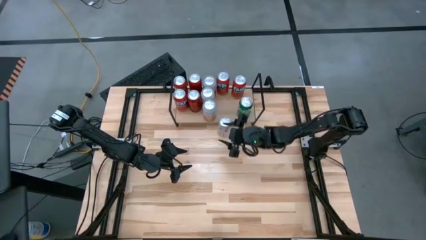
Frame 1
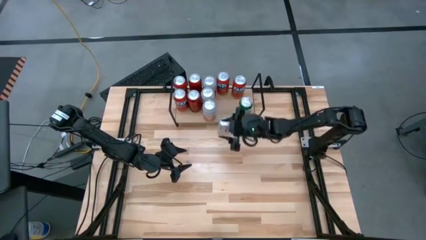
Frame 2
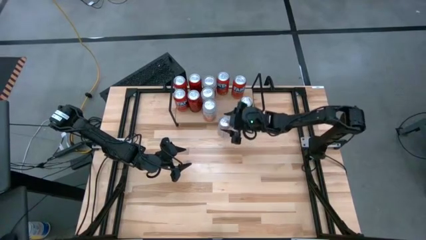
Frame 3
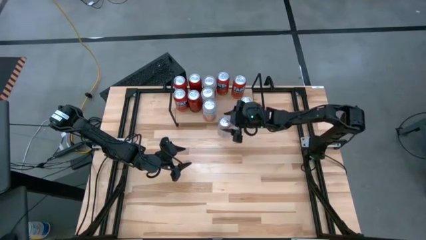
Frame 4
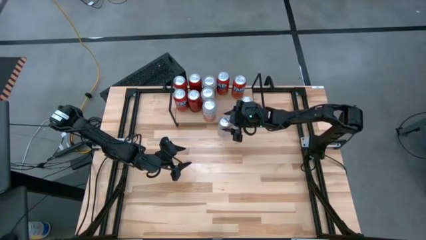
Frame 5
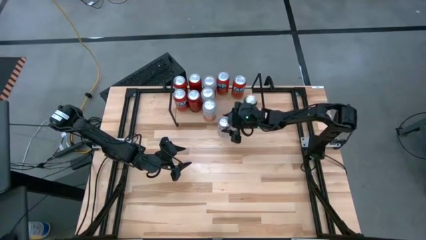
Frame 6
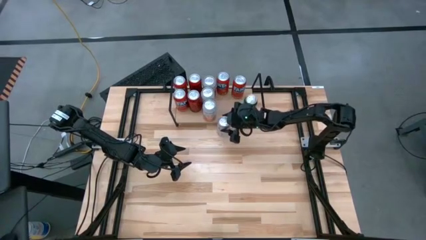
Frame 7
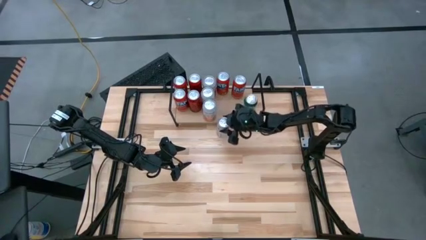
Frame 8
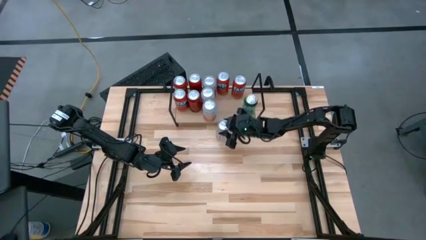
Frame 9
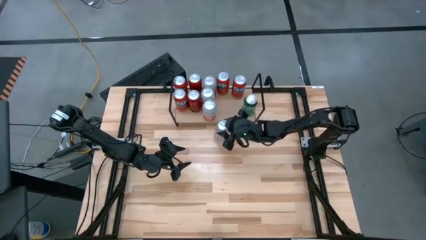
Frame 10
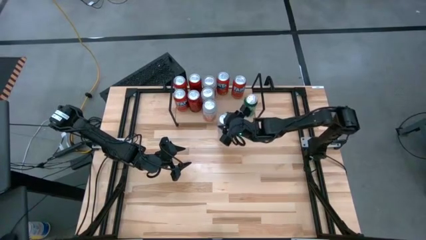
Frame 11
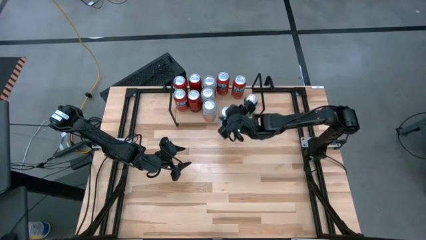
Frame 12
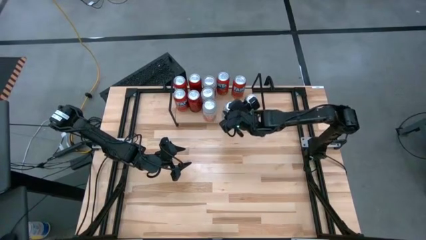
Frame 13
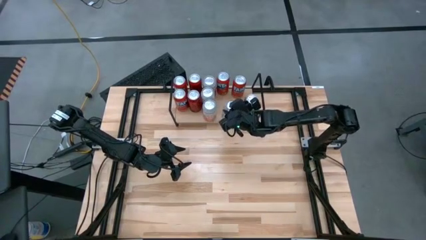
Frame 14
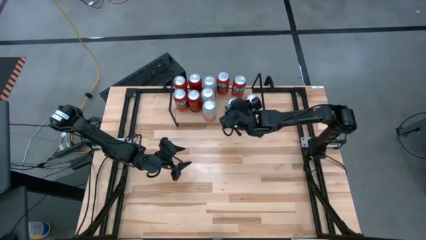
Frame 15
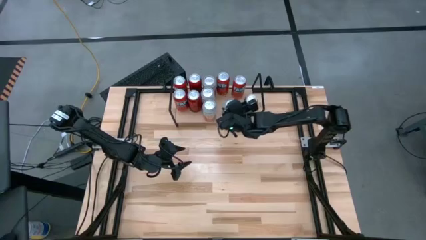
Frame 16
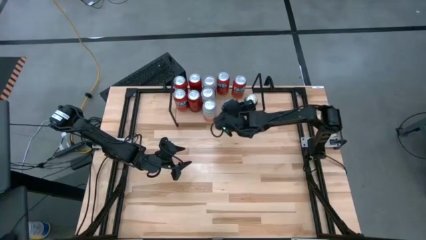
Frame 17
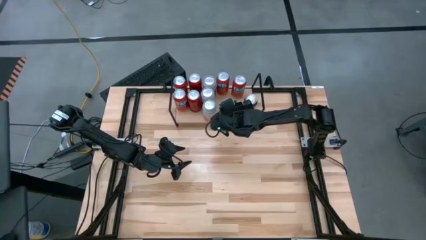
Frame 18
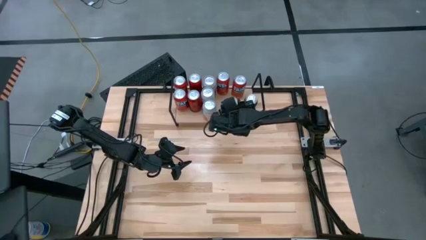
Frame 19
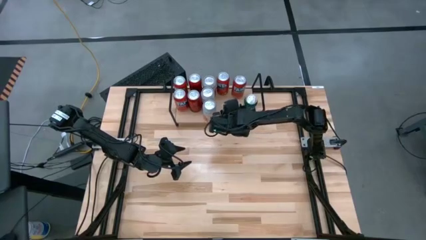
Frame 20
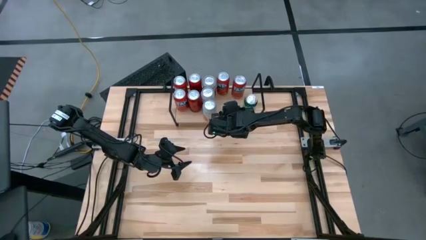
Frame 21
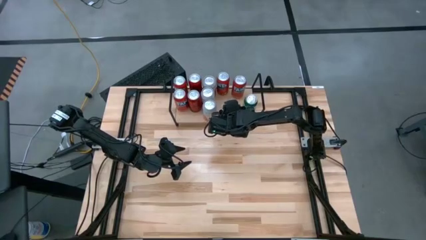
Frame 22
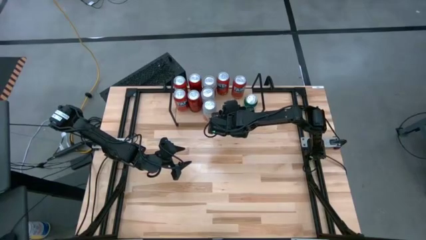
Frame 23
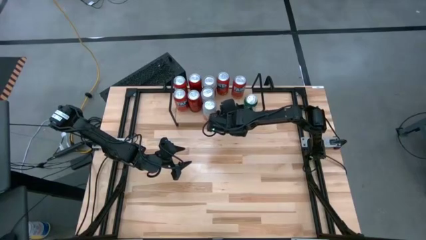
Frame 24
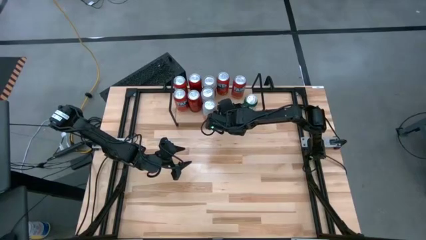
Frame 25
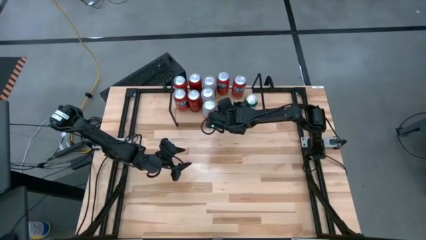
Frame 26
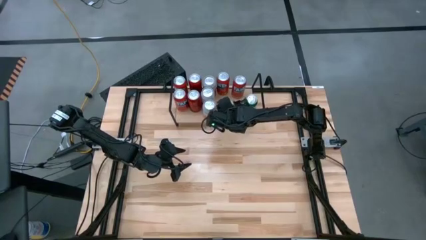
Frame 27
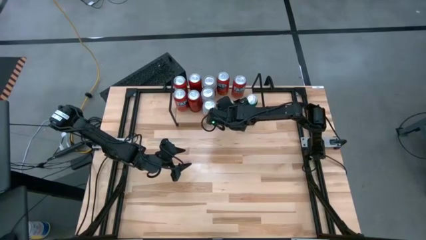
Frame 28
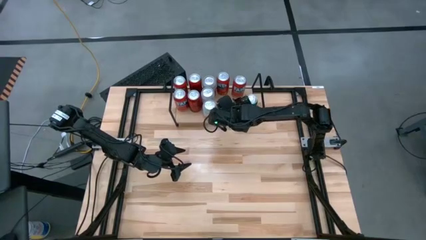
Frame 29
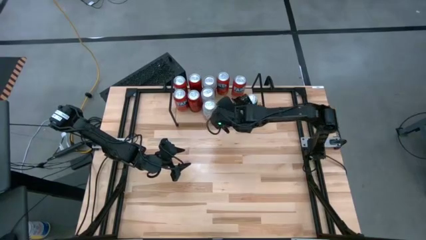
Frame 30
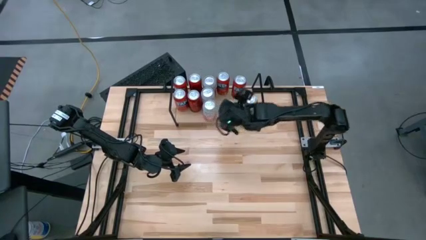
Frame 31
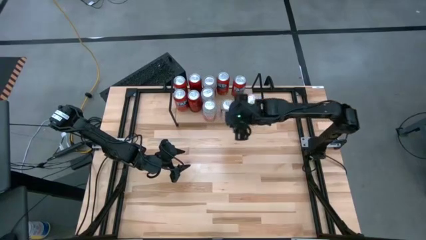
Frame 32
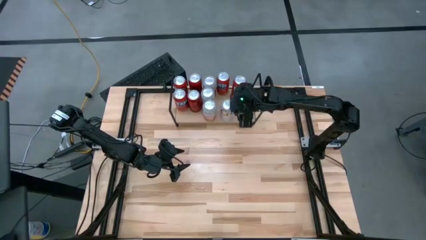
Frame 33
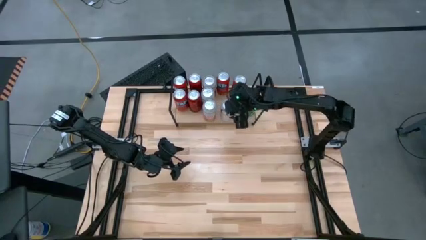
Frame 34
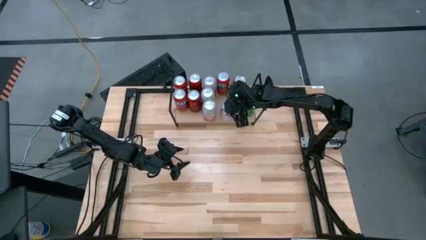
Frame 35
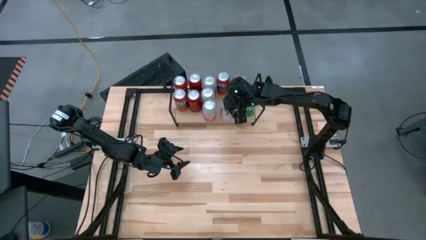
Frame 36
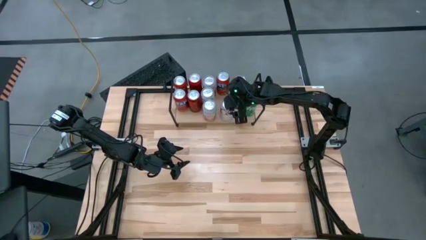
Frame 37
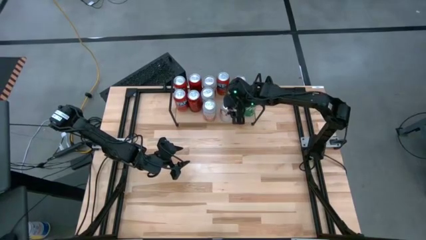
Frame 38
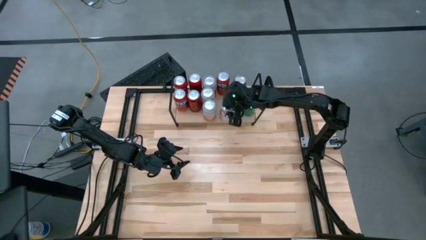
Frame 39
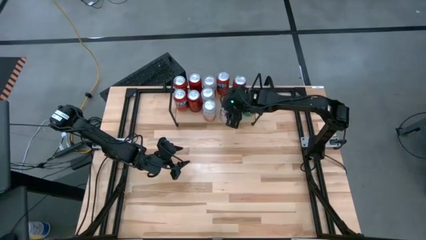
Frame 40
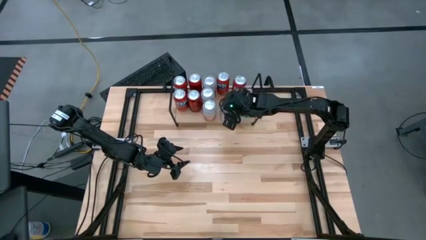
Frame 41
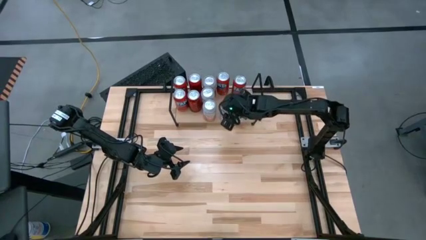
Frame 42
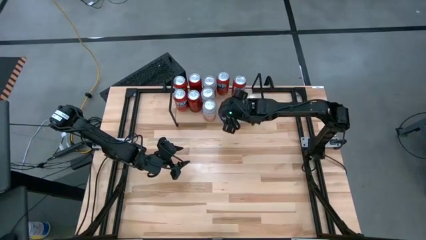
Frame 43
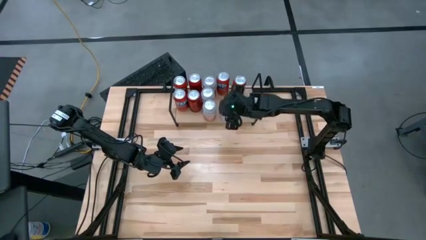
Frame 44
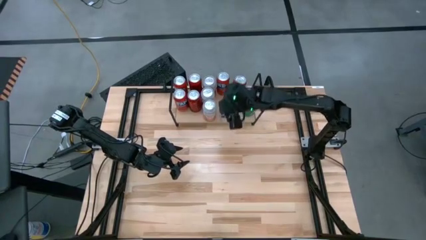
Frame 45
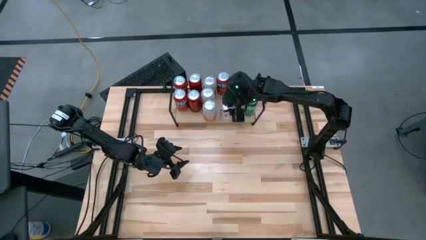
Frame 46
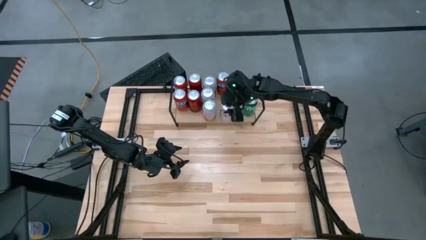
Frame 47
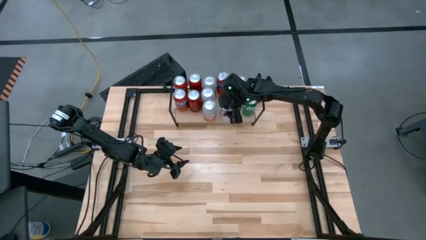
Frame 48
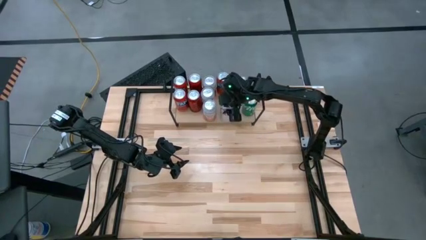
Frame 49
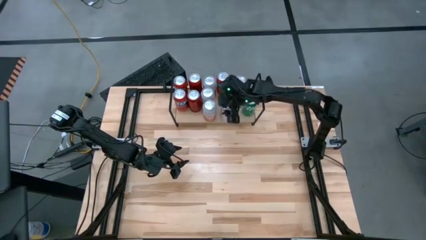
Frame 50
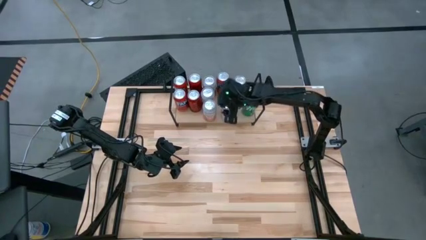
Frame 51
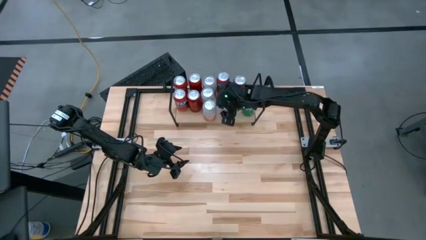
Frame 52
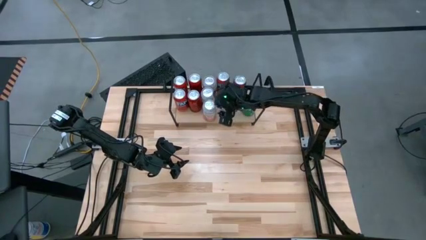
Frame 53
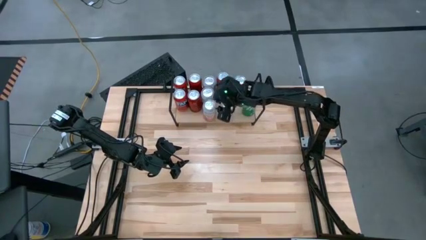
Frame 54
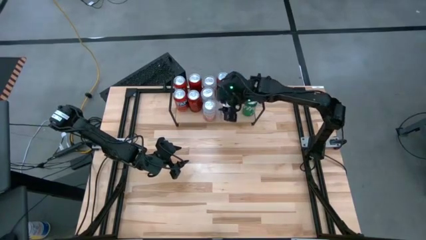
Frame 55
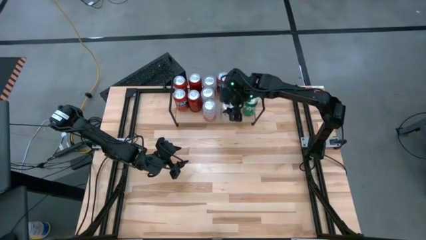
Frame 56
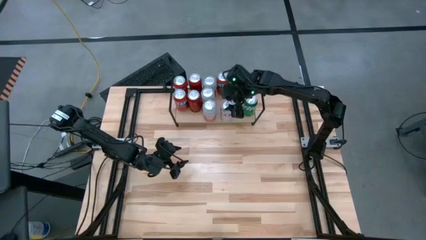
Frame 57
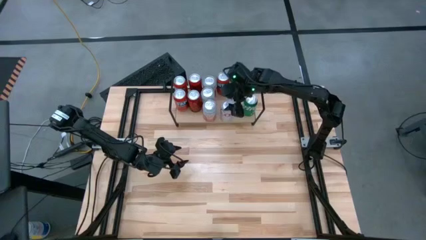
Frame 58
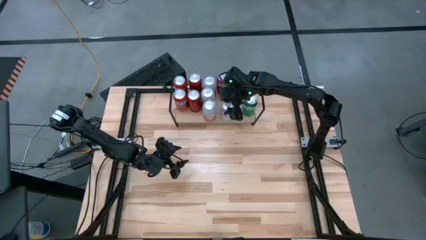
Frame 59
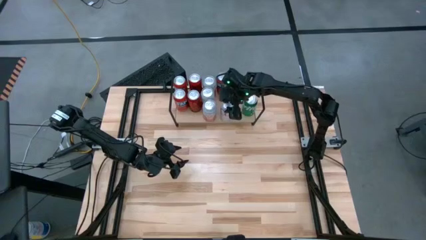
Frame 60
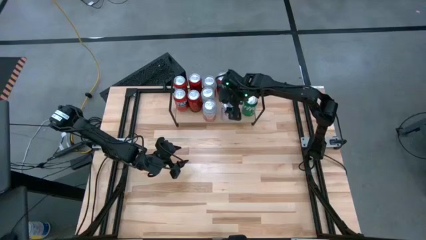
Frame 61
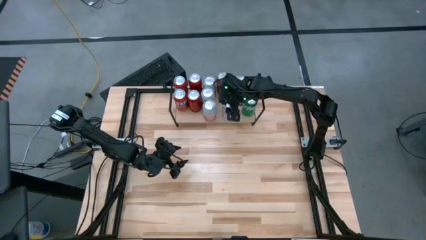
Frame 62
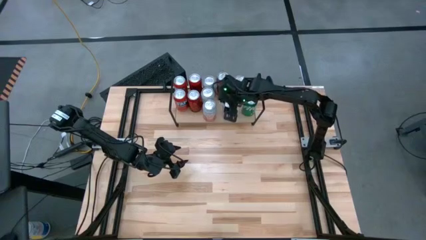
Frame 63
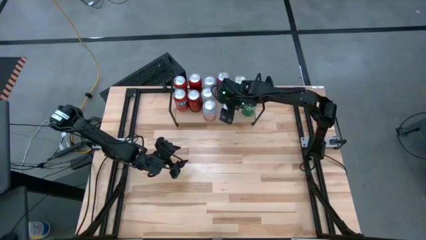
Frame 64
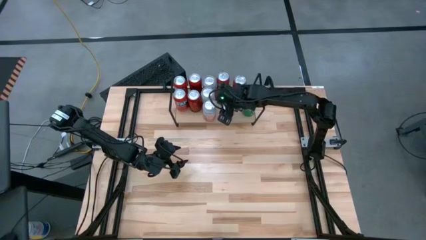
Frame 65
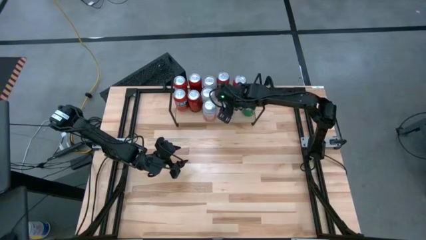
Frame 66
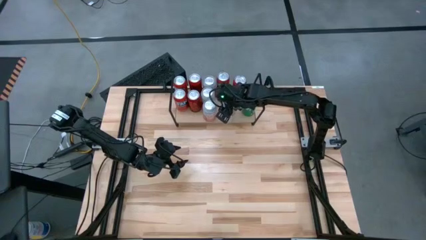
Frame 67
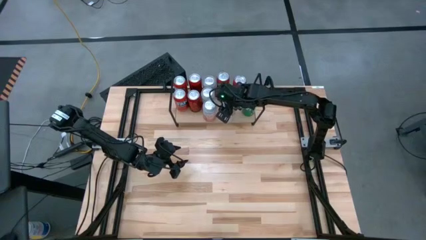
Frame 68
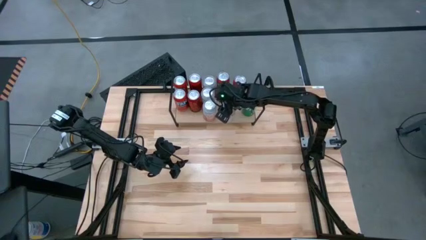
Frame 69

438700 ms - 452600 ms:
Task: Place canned beverage on shelf
Put the red silver soda can on the shelf

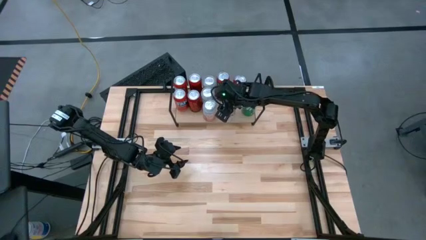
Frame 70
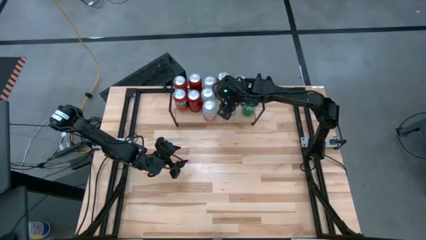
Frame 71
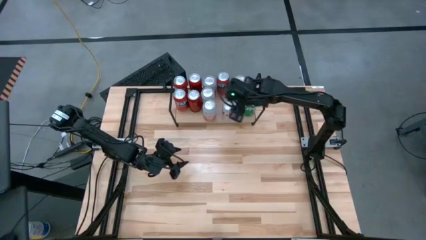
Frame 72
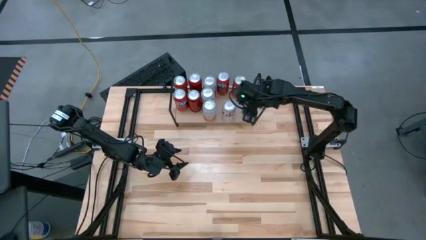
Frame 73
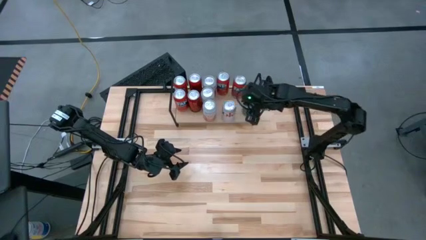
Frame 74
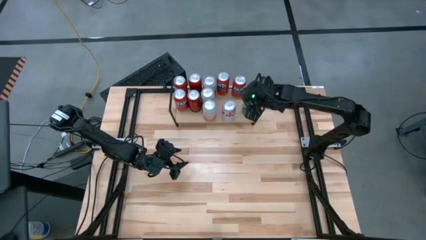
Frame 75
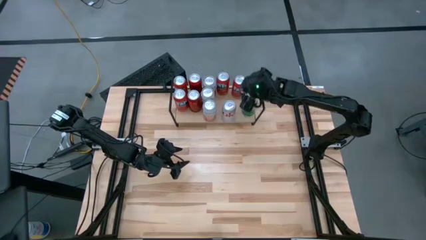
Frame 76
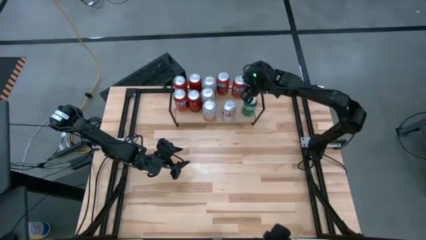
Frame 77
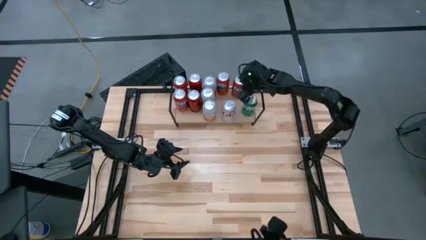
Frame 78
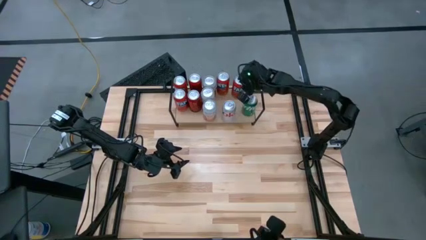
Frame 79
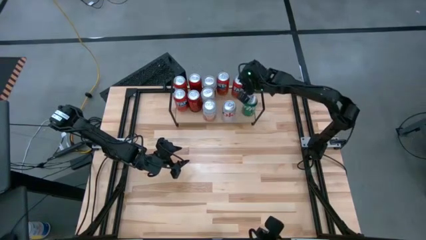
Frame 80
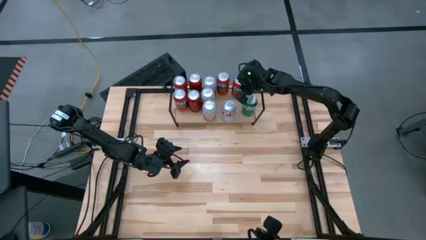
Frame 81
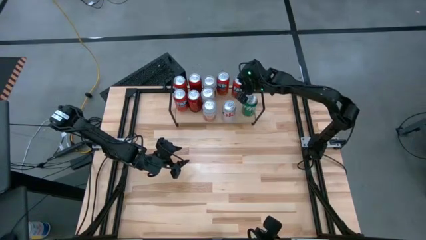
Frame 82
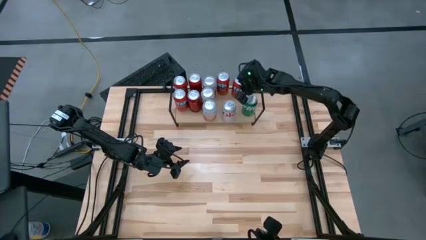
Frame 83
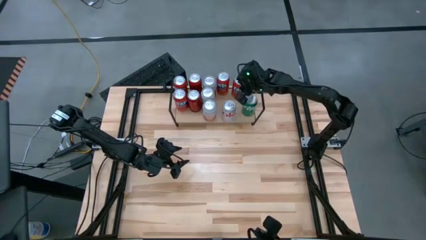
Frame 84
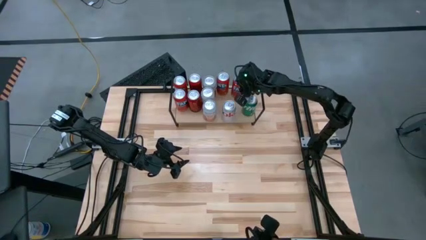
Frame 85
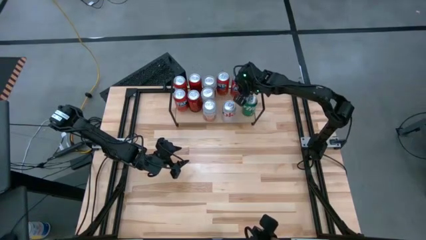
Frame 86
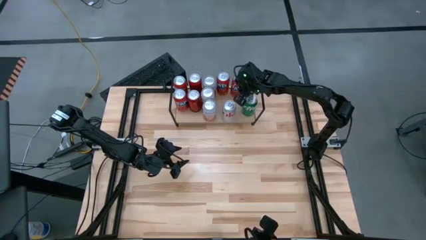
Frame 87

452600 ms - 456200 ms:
Adjust the red soda can on the shelf
